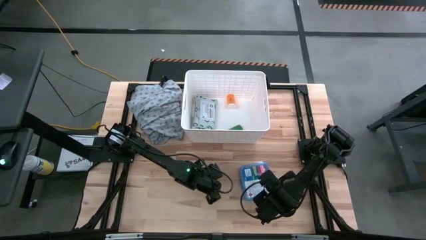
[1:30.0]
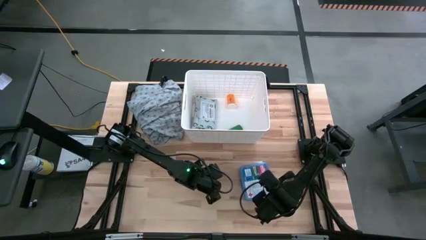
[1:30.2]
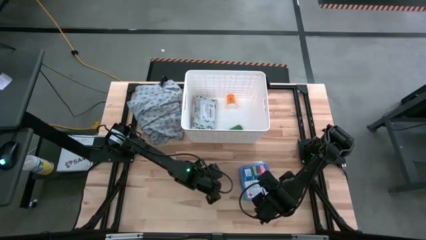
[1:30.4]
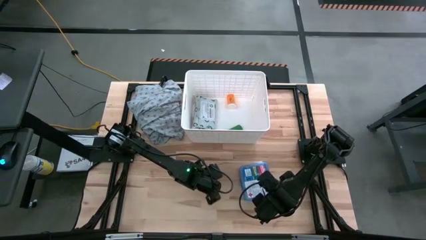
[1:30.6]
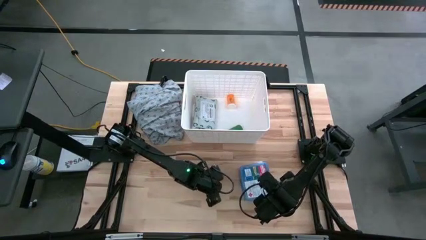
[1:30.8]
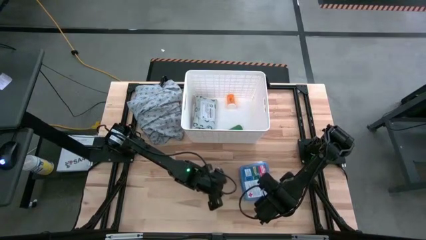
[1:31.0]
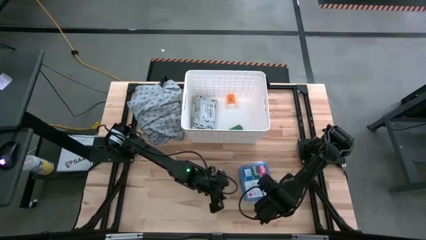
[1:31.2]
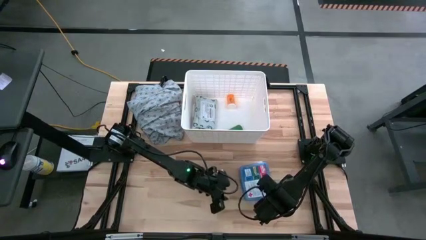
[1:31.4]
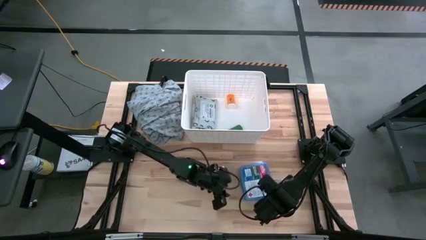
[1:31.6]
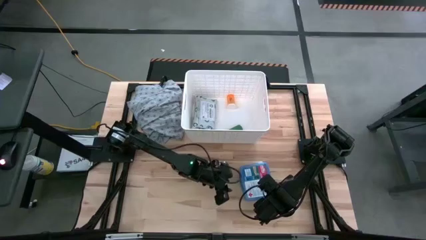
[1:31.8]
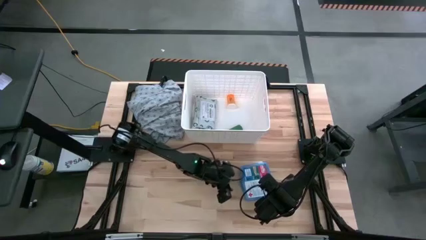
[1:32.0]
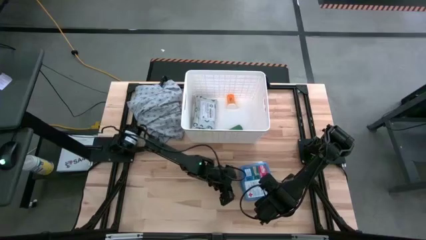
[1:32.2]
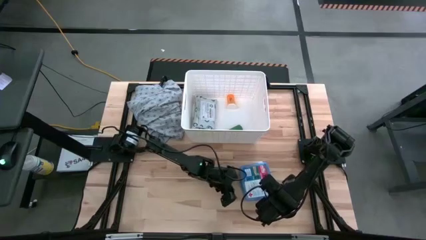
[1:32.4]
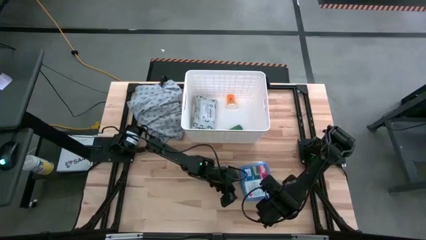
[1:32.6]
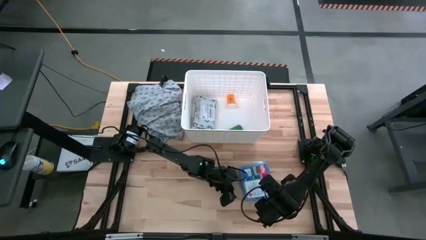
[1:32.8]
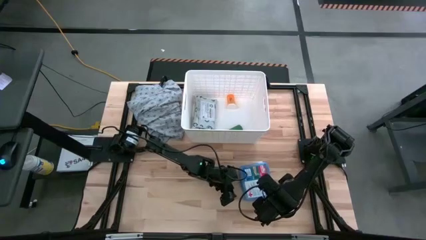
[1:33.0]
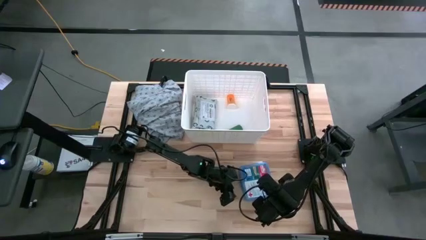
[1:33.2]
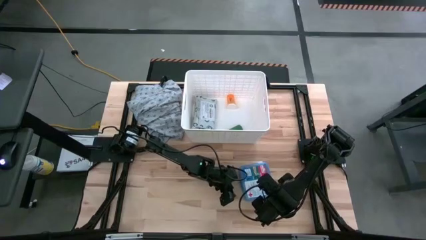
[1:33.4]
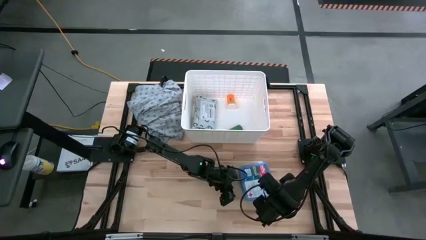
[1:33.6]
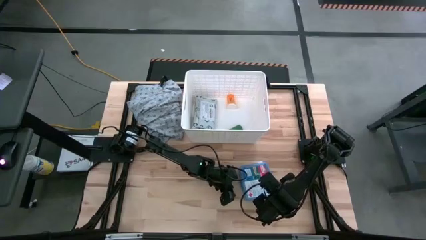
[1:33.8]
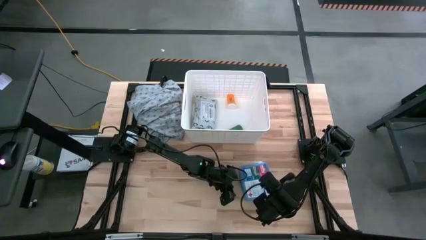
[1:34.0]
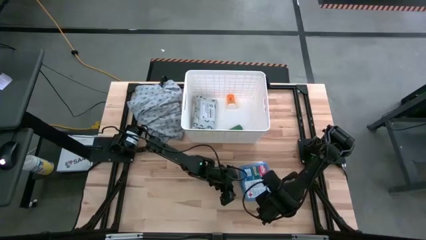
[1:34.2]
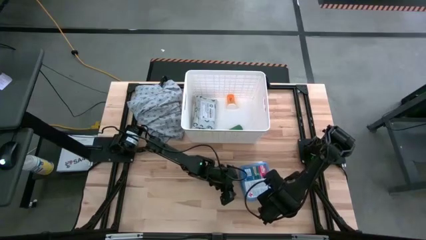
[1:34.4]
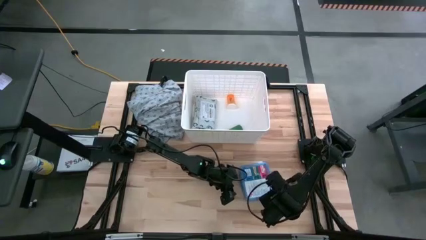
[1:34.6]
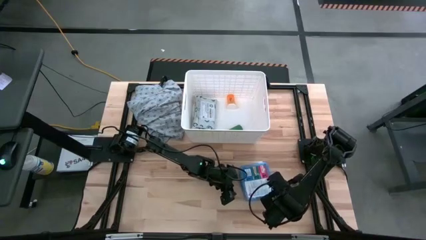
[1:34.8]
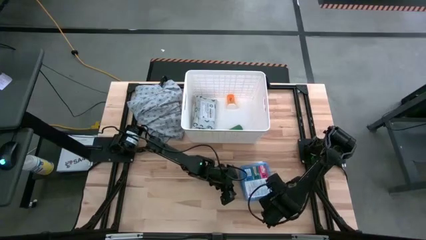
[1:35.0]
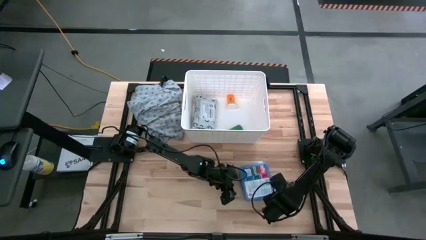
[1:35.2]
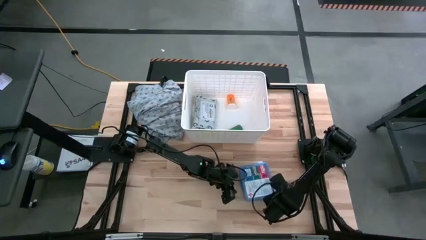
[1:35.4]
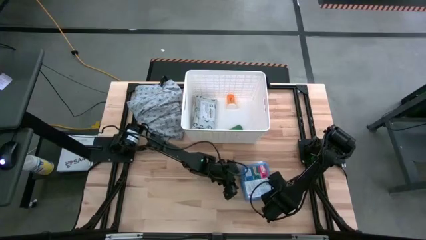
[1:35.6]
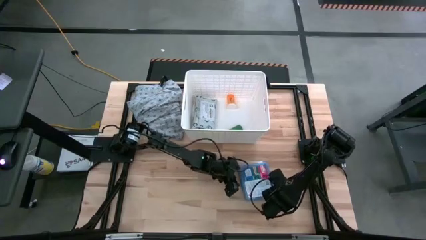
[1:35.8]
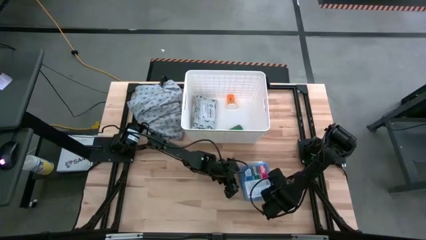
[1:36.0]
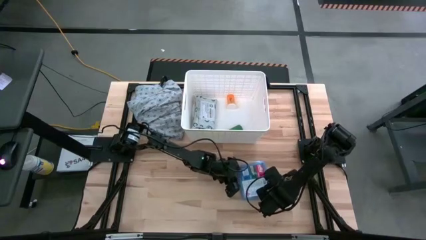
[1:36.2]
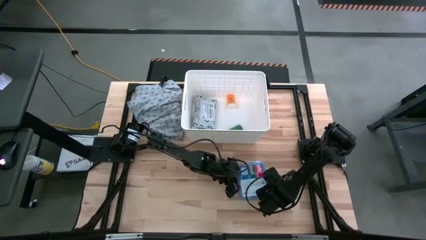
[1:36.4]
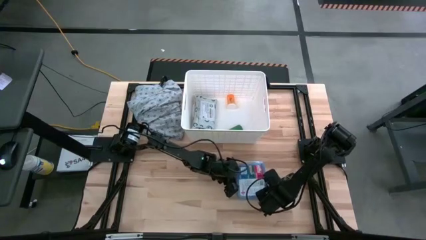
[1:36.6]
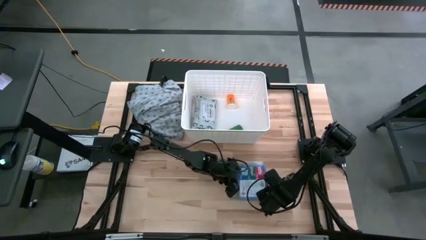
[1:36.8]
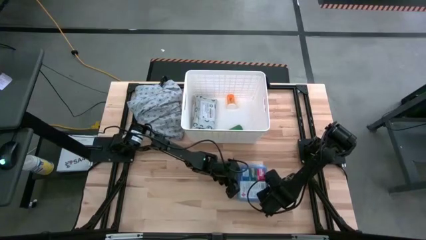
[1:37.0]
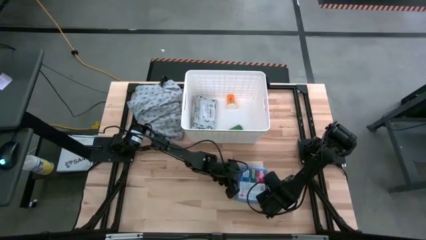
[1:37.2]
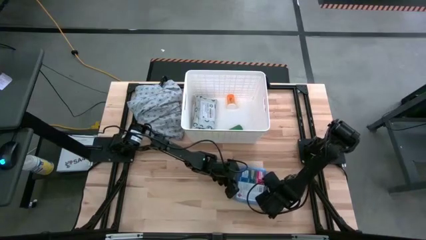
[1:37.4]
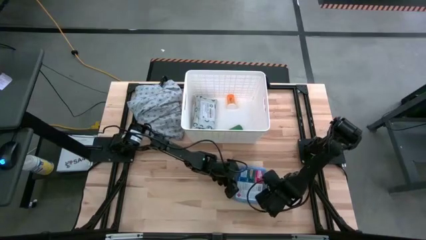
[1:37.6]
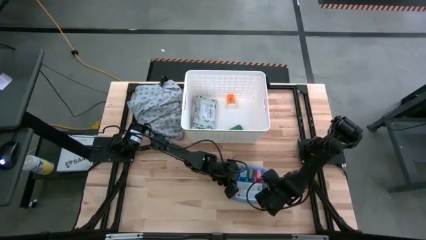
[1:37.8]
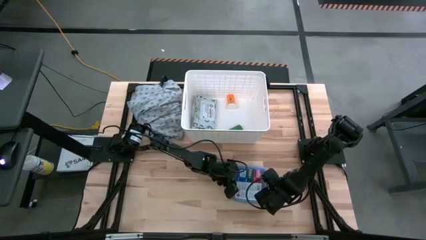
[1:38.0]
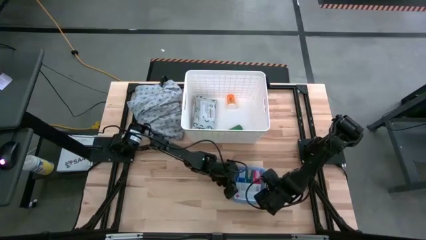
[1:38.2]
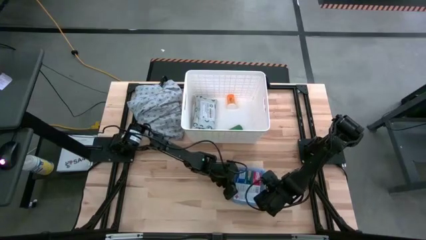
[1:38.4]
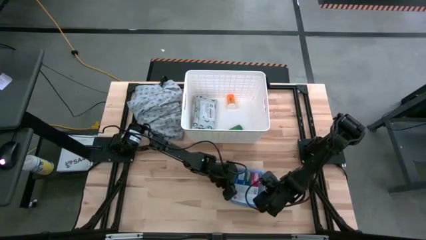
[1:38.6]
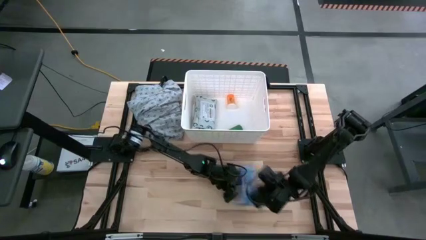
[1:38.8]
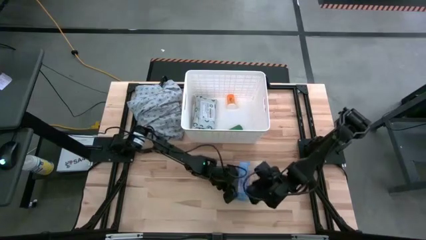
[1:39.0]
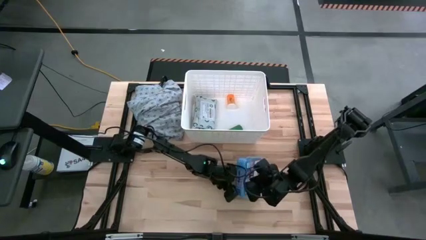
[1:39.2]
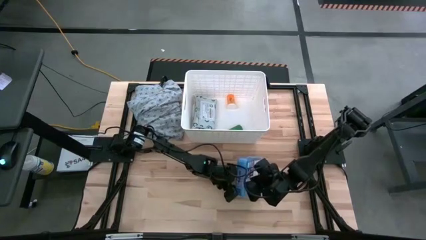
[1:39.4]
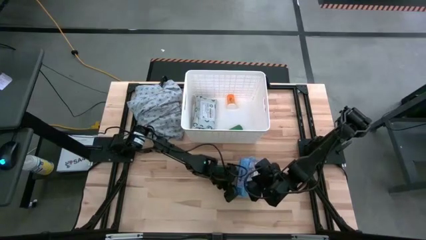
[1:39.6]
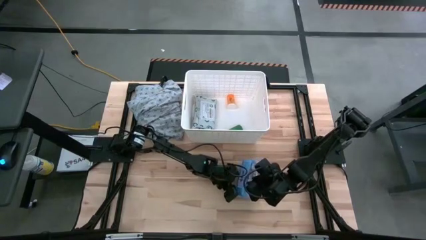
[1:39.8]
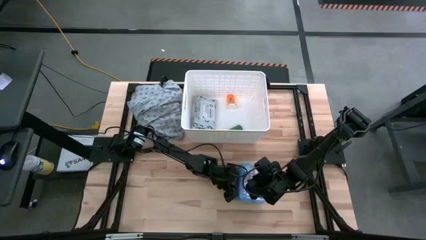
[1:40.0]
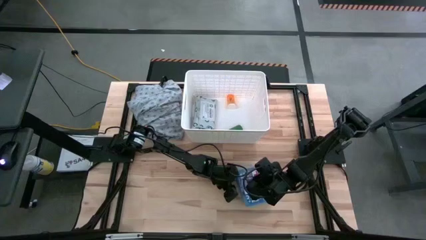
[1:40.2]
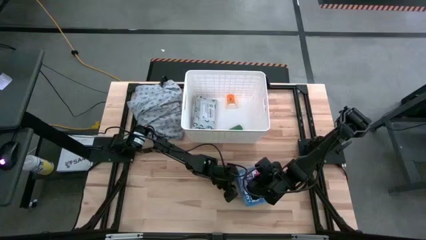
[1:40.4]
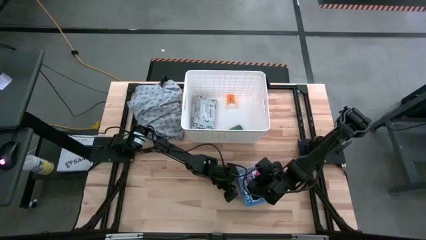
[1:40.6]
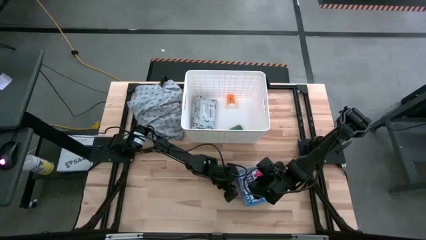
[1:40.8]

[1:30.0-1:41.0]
Task: Pick & place medical supplies in basket/bin
Put the blue first aid kit in the white bin

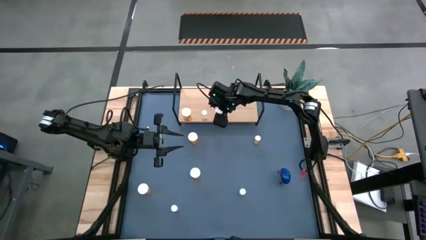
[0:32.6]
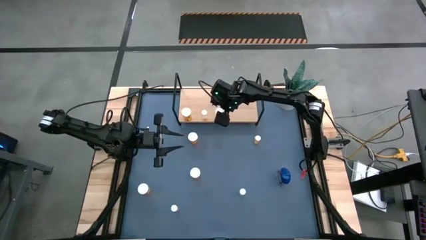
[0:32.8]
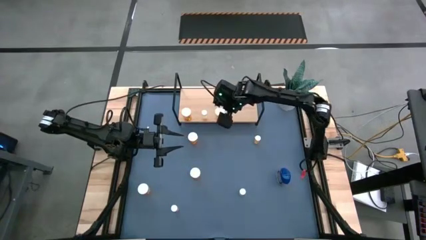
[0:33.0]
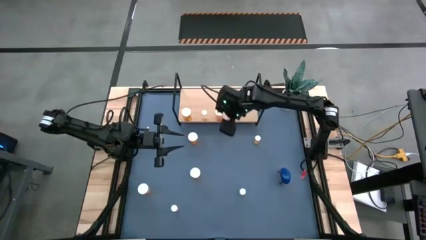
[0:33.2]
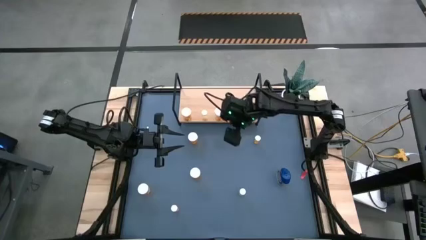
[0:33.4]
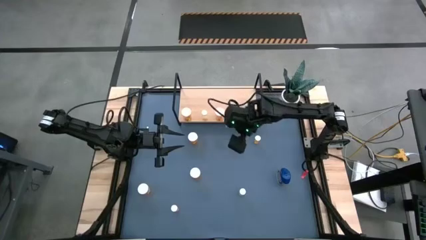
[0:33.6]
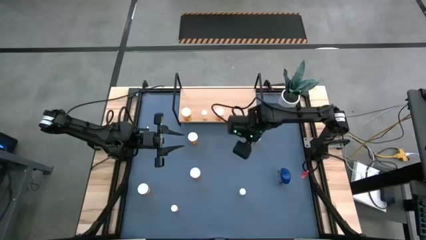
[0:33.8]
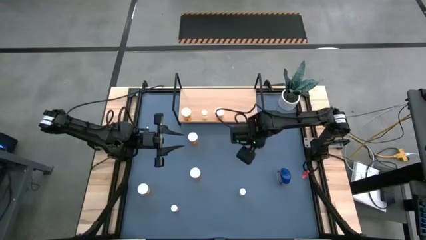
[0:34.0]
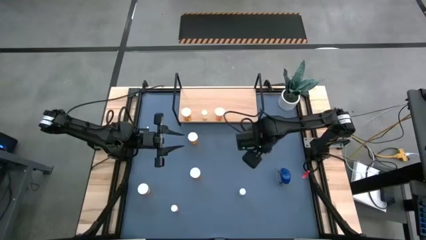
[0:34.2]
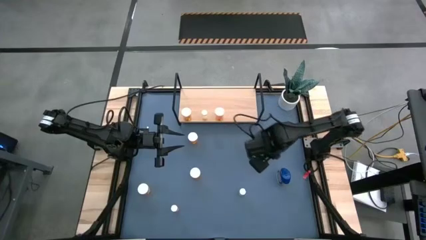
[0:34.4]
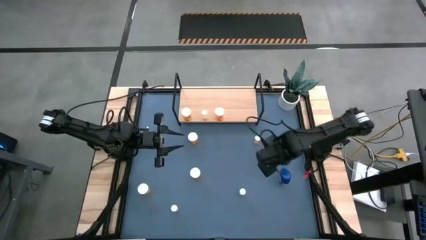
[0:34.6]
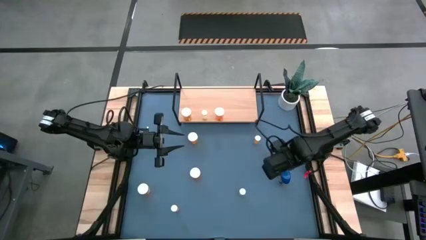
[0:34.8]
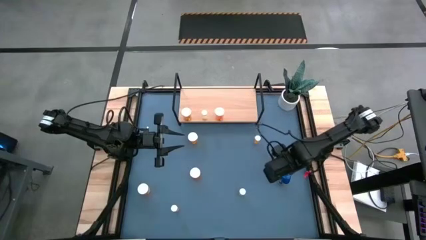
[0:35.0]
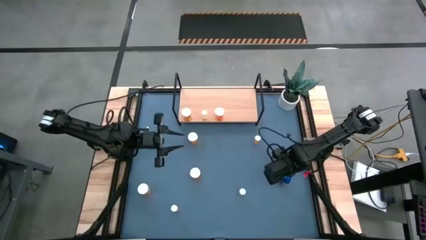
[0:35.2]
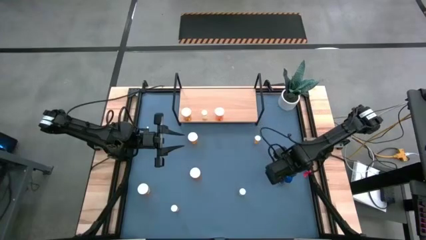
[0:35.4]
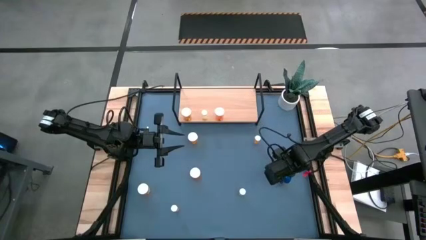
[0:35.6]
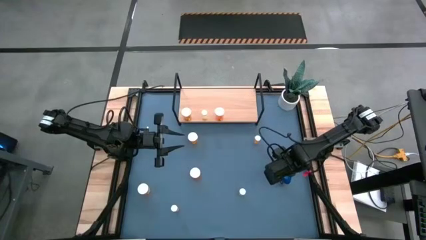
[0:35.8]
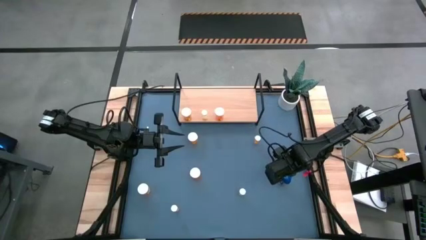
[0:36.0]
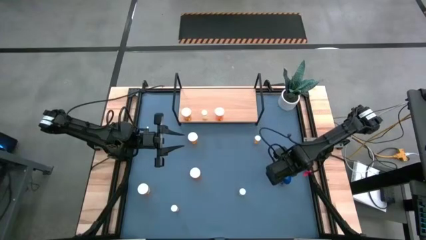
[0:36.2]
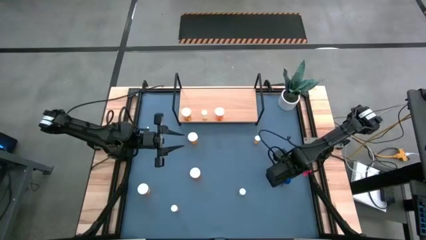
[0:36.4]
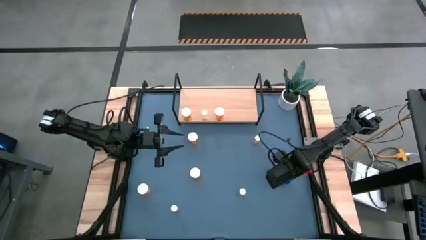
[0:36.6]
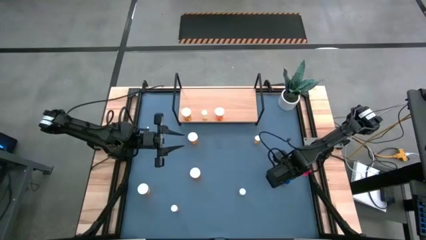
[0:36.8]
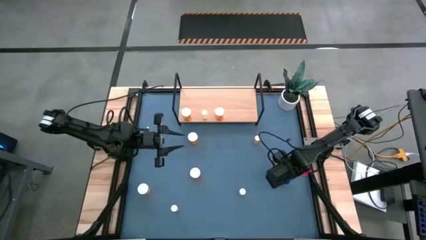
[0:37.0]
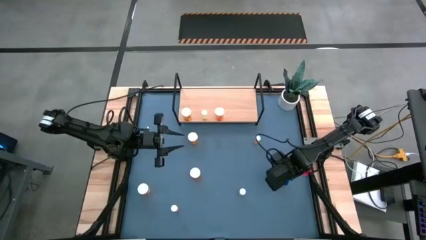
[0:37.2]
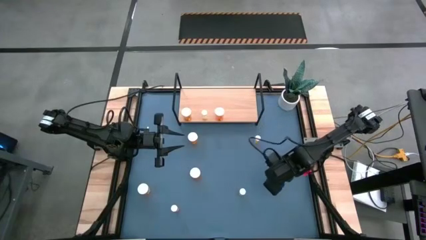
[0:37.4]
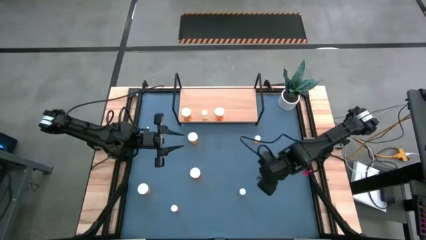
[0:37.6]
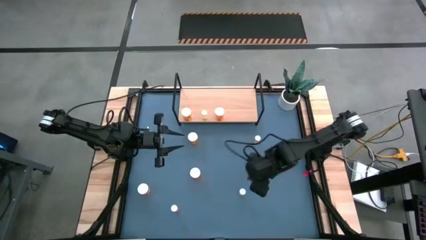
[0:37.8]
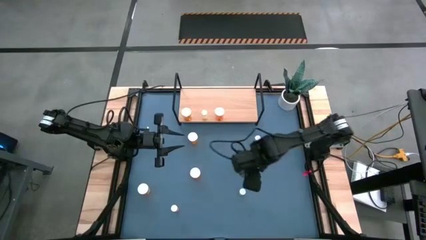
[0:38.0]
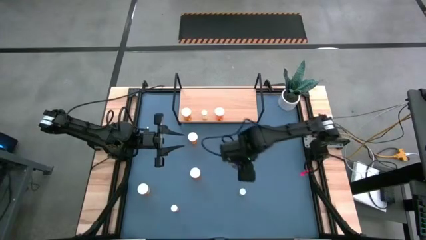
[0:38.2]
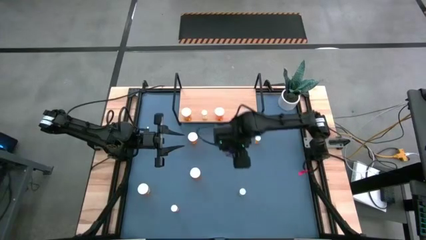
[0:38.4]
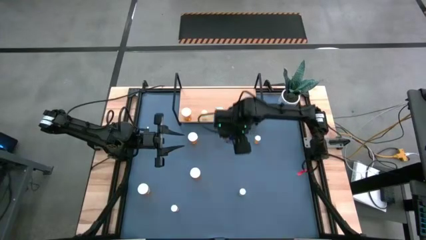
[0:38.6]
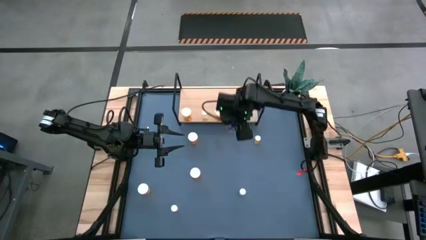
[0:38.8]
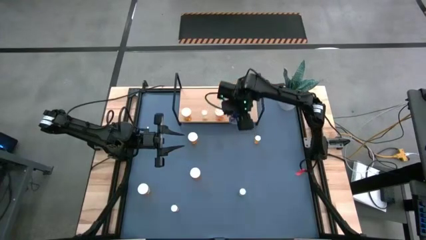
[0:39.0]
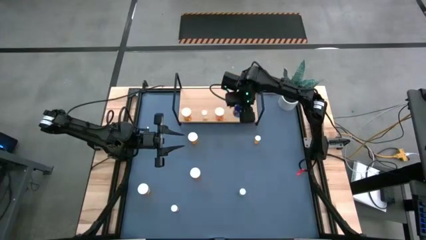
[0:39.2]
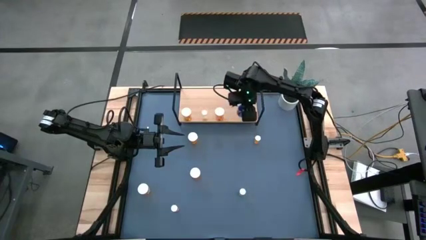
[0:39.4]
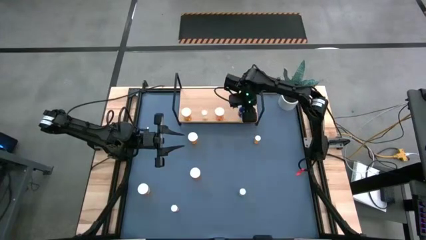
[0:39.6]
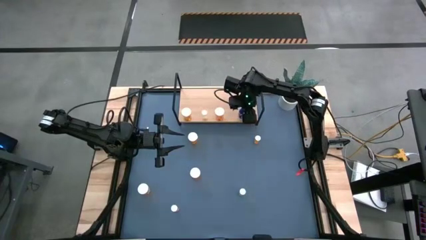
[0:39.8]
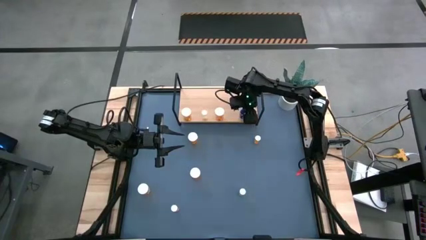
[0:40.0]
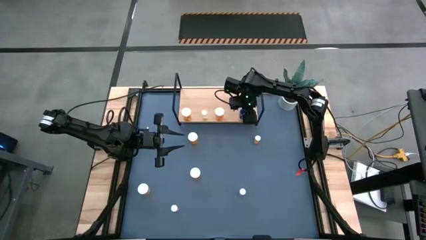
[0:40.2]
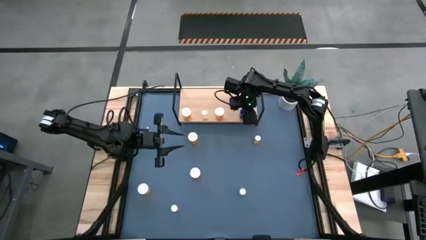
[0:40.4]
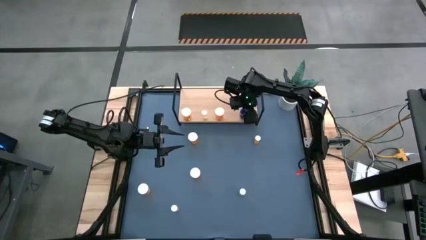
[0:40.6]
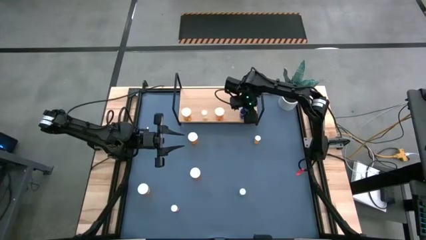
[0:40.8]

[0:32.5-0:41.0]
Task: Pick and place medicine bottles onto shelf by color
Put the blue pill bottle on the shelf
